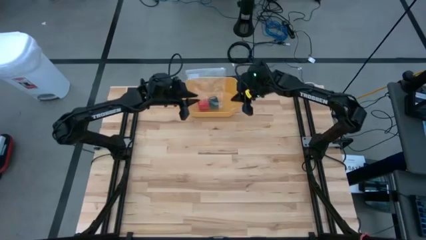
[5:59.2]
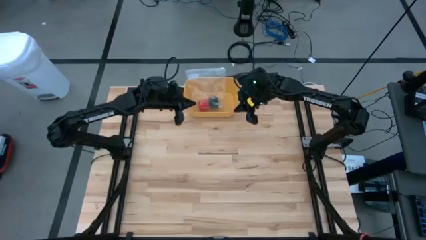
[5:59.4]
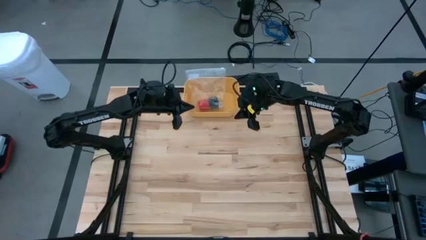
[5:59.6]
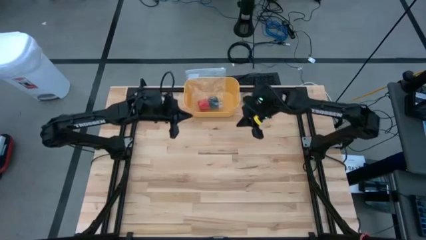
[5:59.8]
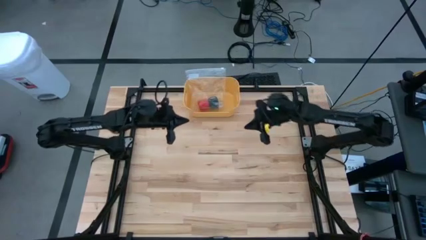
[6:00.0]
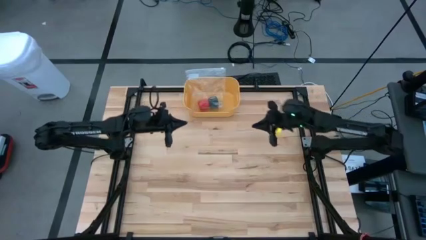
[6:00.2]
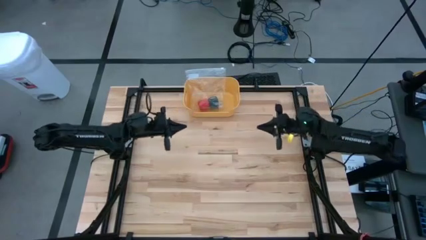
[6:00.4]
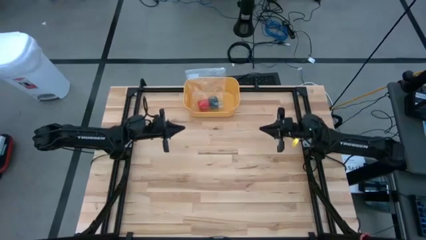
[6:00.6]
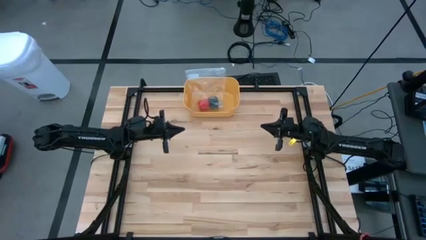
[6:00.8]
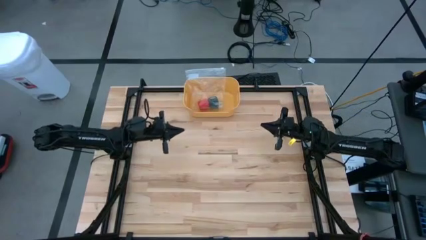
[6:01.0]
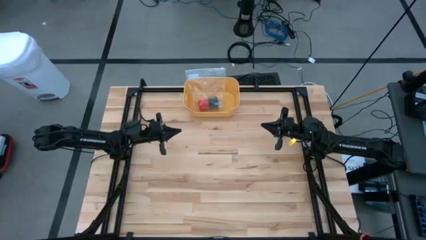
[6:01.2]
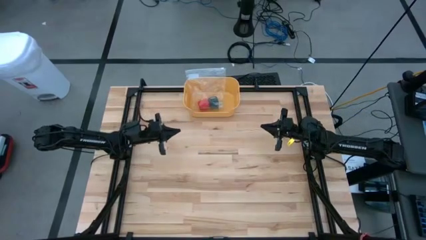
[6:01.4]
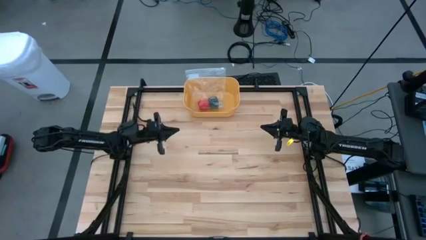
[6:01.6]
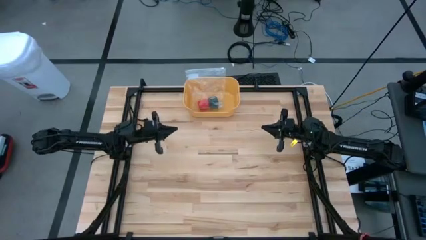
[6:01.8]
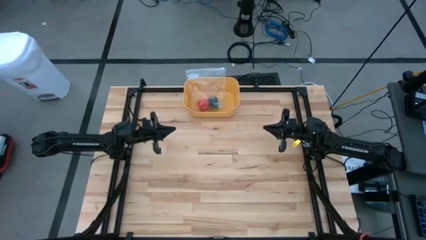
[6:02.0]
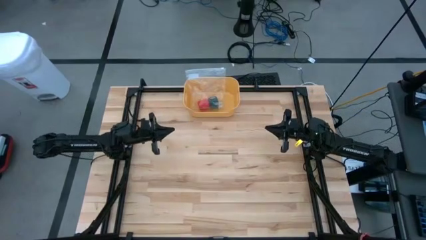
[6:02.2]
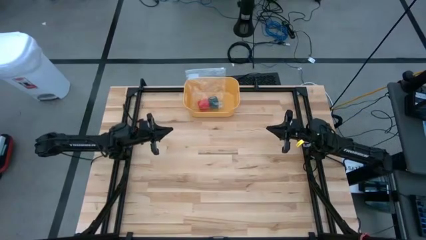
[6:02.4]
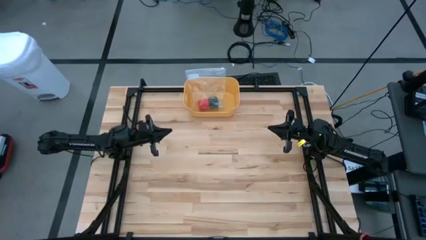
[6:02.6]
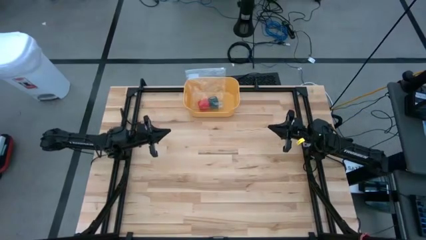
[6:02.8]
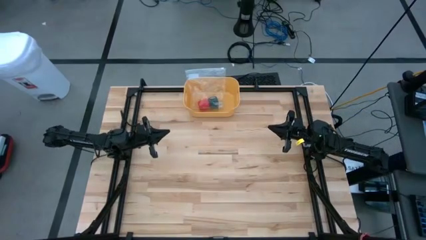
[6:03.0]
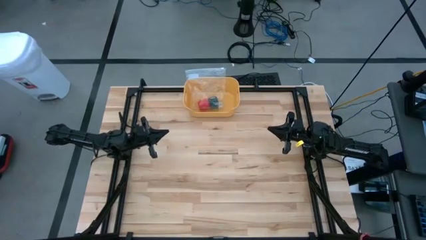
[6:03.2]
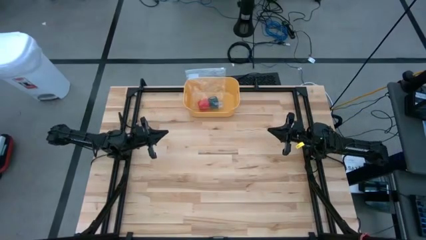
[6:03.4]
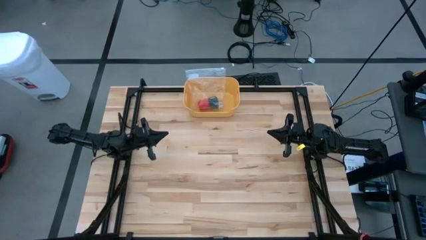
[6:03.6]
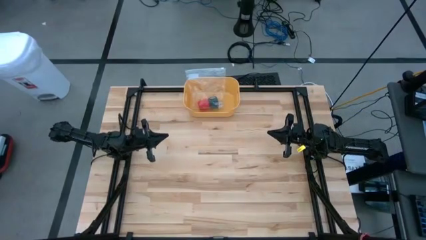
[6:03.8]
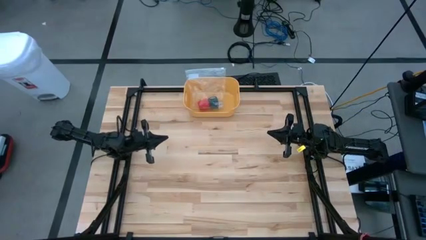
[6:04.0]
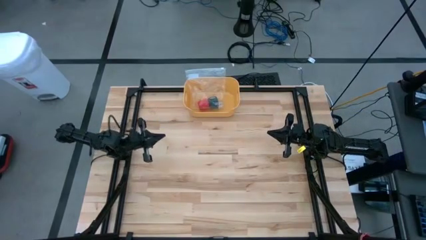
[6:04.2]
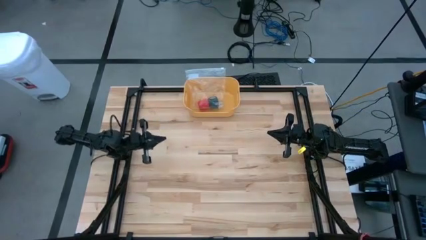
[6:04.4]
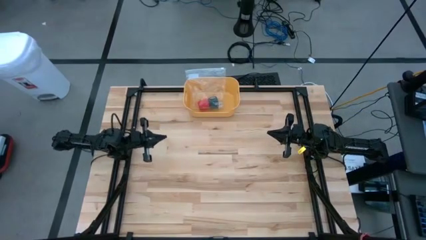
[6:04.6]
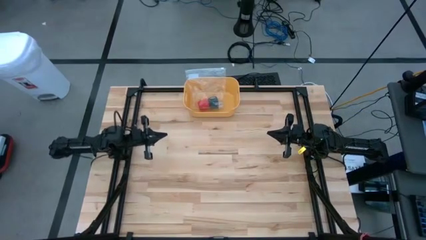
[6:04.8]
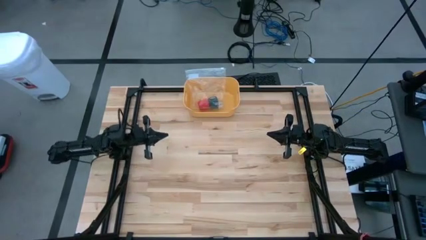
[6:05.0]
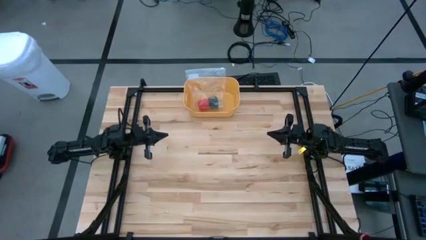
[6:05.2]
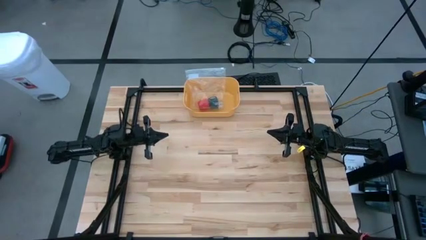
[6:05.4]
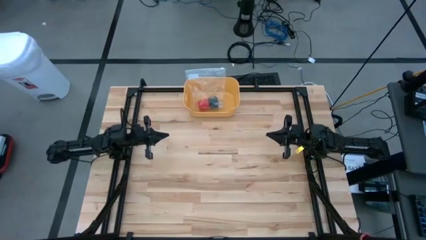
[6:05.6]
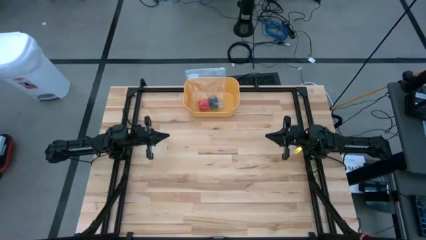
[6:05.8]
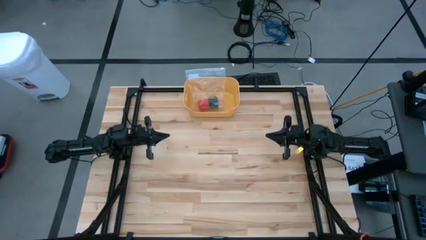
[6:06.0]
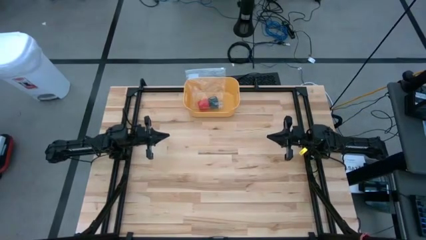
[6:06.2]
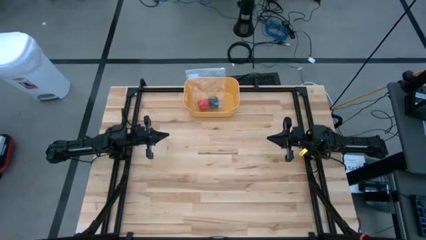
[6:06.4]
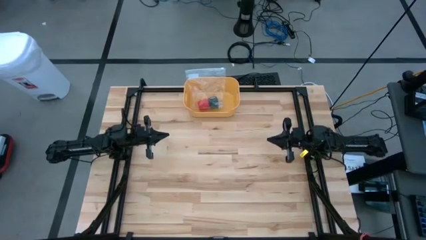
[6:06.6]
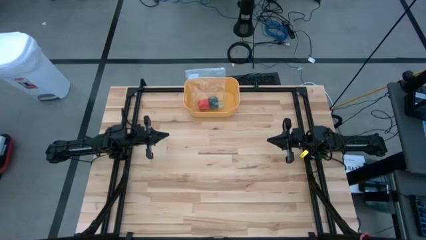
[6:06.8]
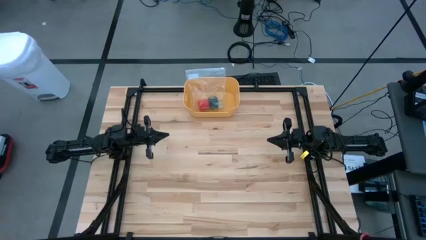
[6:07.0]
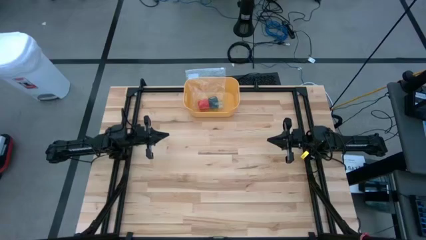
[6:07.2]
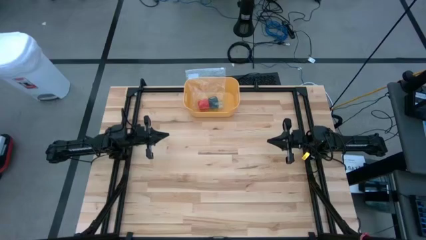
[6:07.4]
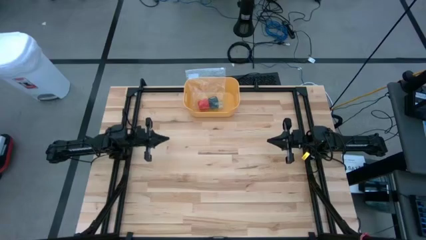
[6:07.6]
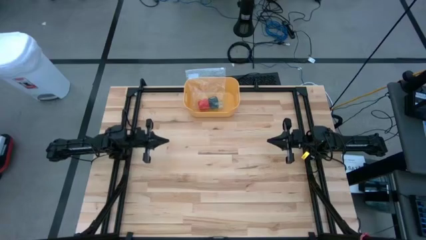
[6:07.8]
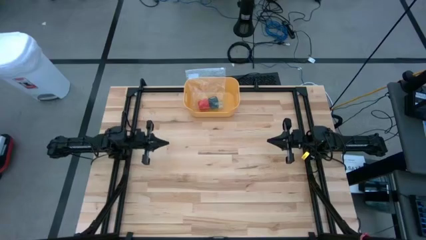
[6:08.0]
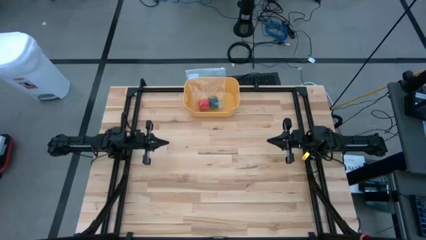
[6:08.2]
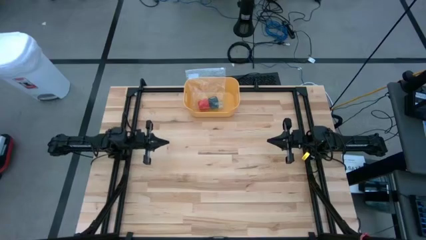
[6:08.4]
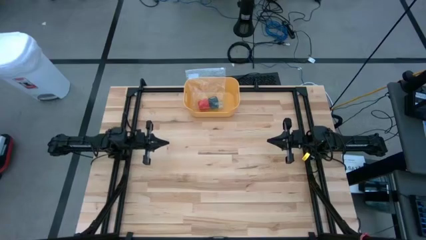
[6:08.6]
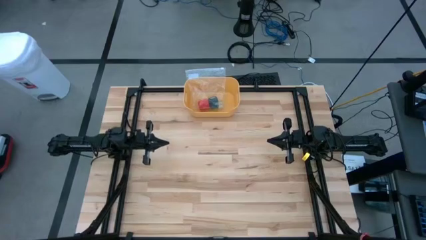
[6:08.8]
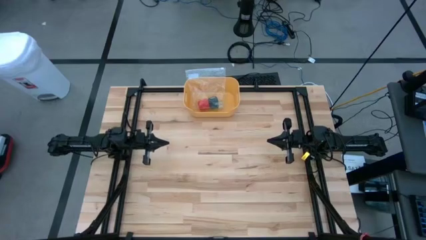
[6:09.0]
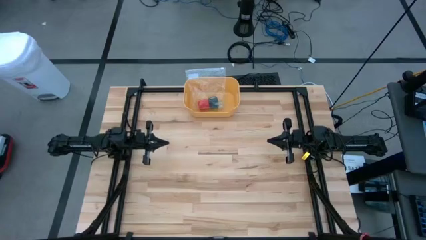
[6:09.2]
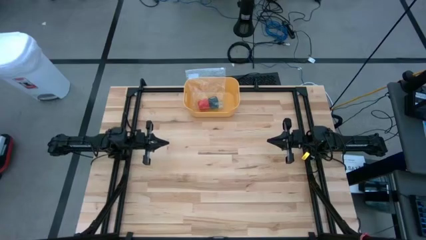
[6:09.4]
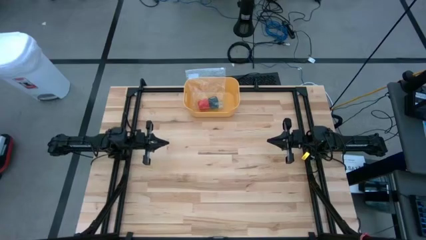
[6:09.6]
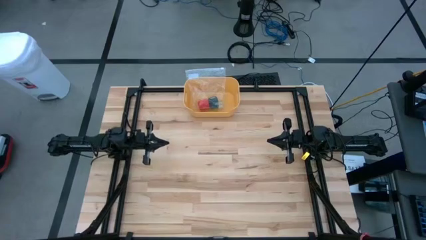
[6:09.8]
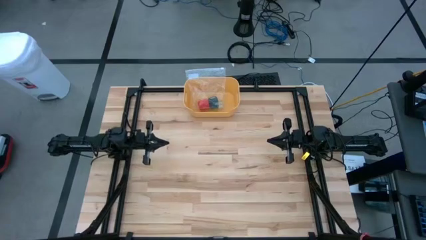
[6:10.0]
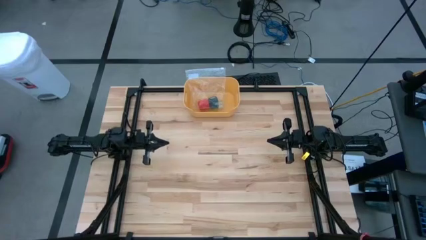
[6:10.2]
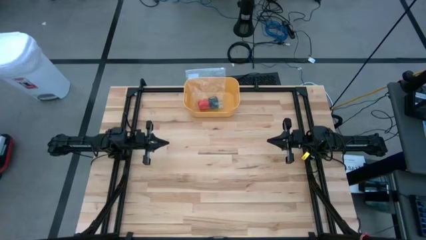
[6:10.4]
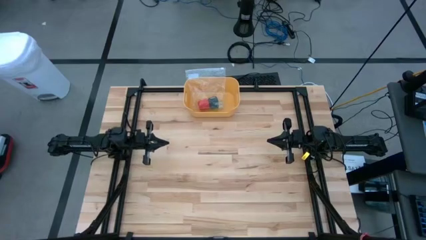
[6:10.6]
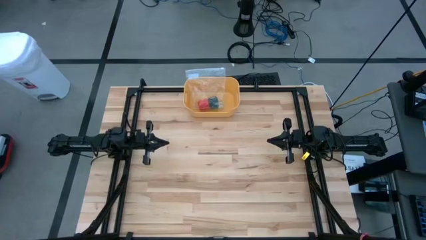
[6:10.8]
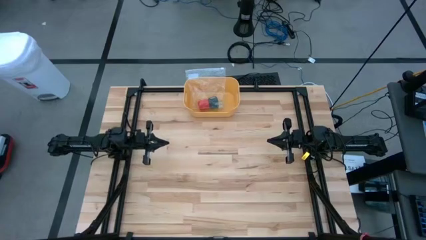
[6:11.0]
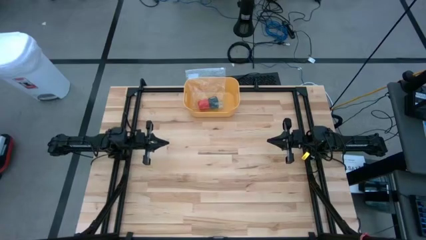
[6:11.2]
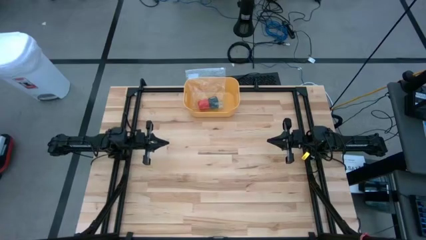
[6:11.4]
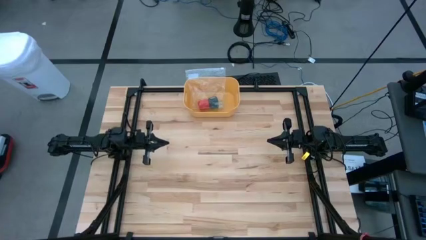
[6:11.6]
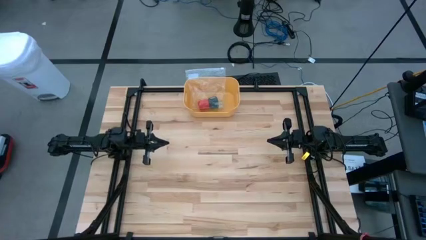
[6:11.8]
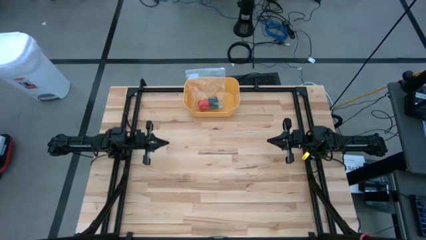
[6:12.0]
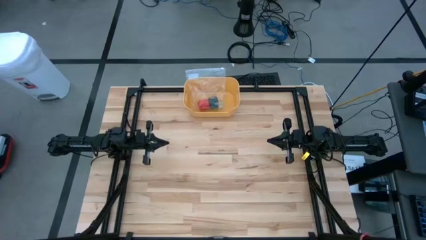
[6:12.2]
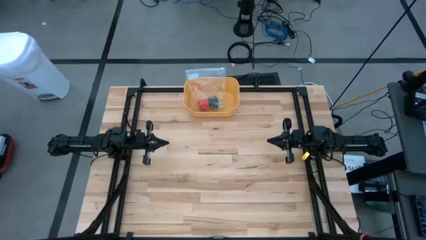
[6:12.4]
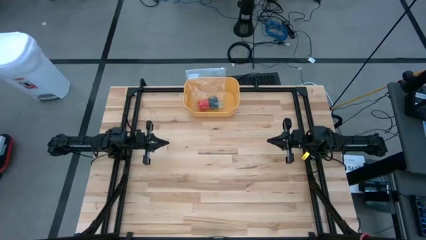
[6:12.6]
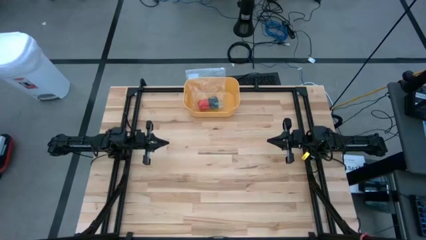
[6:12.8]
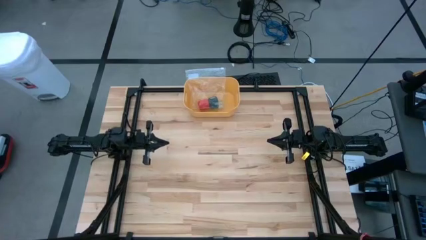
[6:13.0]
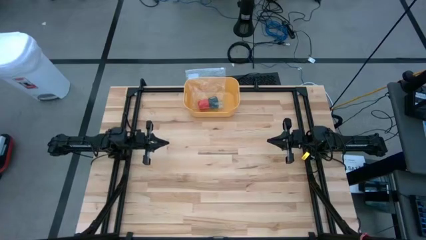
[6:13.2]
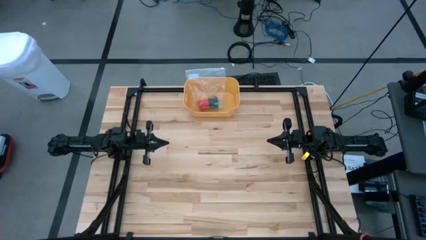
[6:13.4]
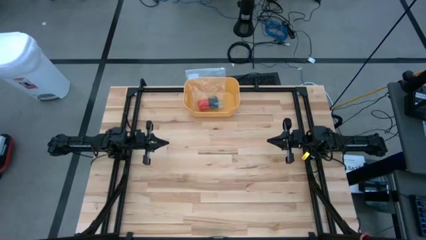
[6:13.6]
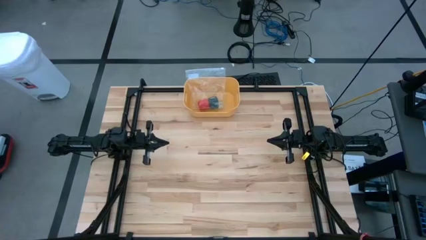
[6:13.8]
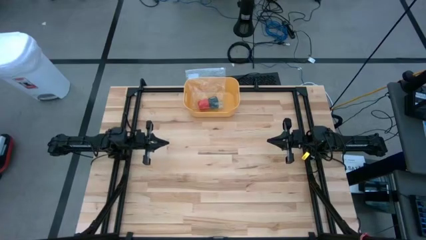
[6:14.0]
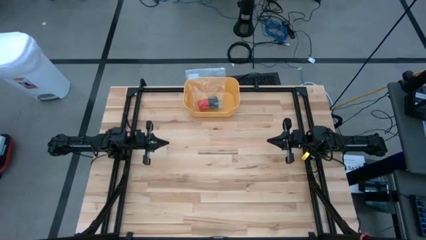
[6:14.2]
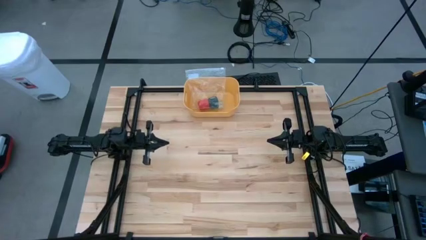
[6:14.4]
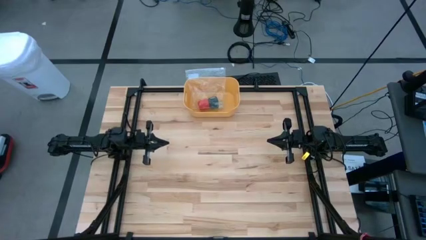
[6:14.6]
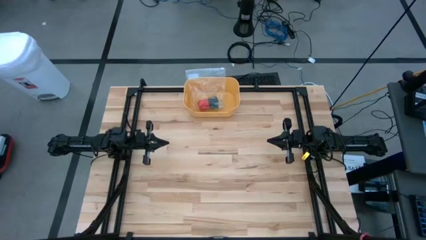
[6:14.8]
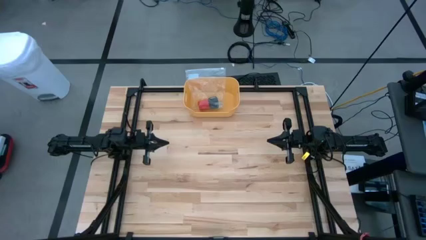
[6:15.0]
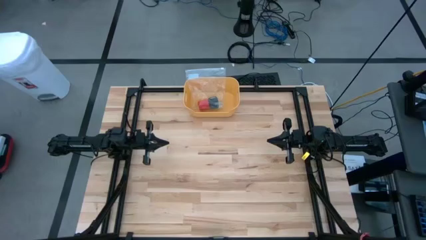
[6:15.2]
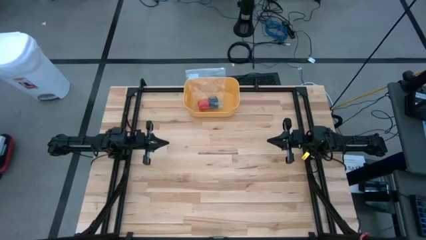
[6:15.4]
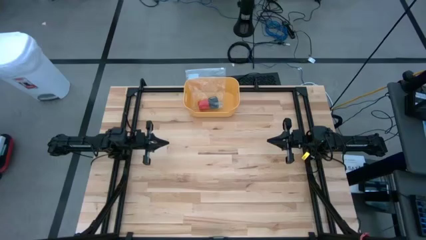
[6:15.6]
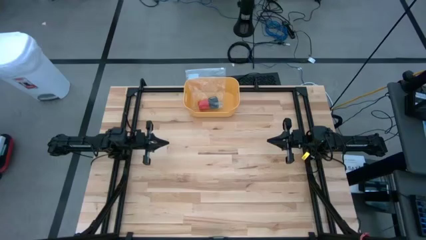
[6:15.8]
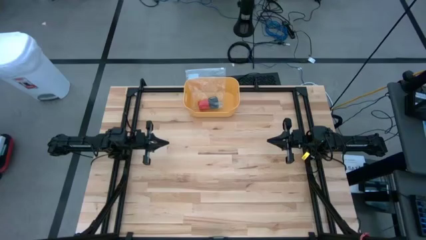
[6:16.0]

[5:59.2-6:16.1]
Task: Roll bandage
Return to home position
